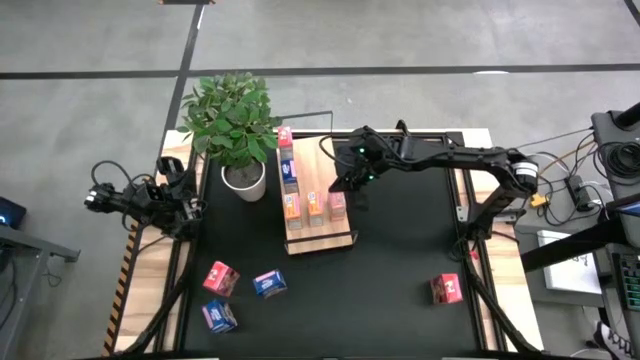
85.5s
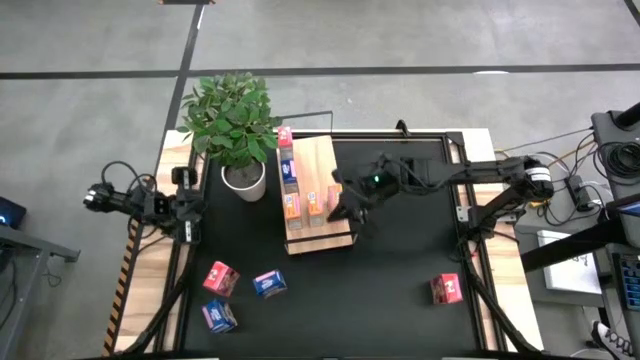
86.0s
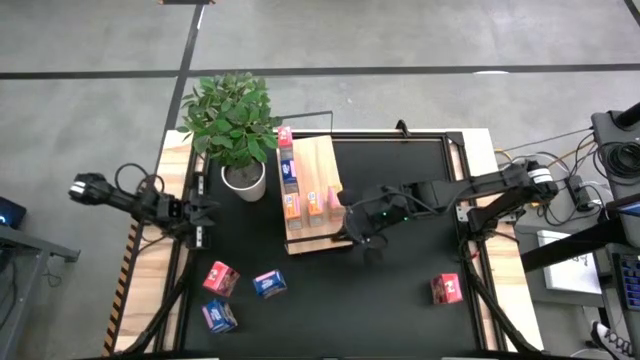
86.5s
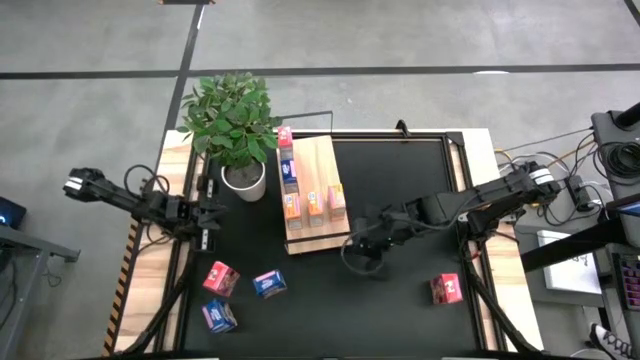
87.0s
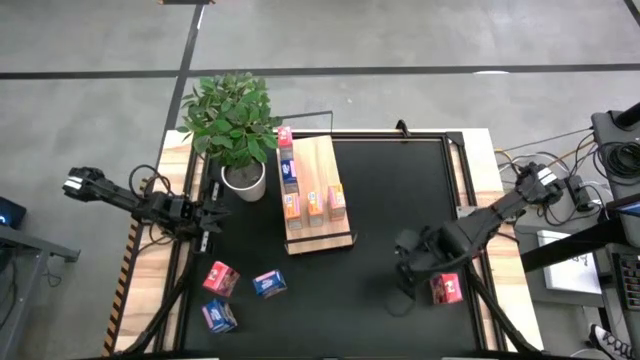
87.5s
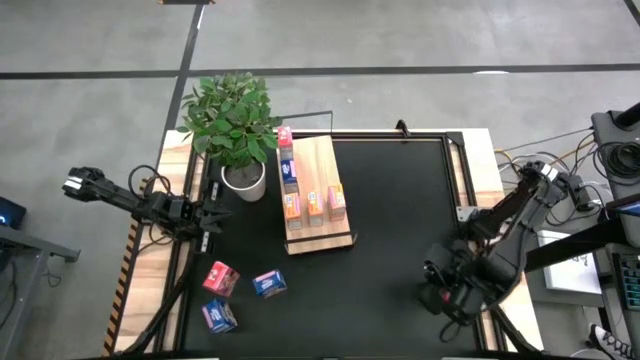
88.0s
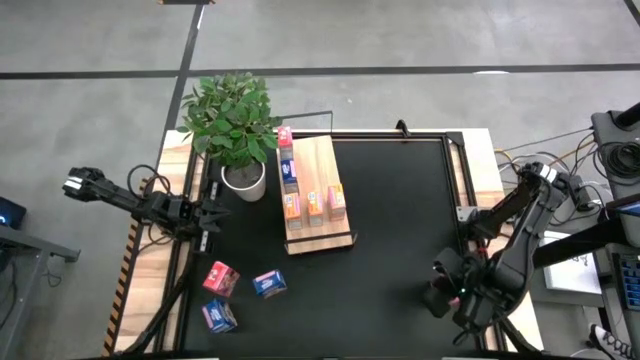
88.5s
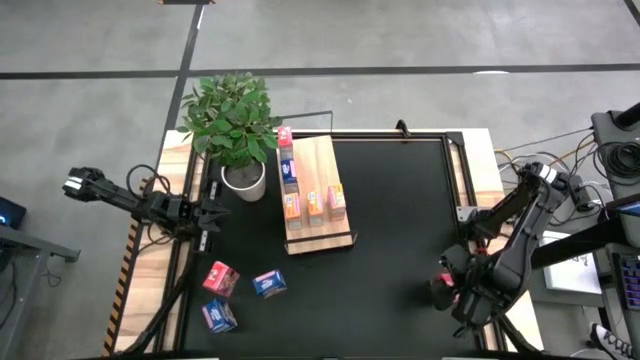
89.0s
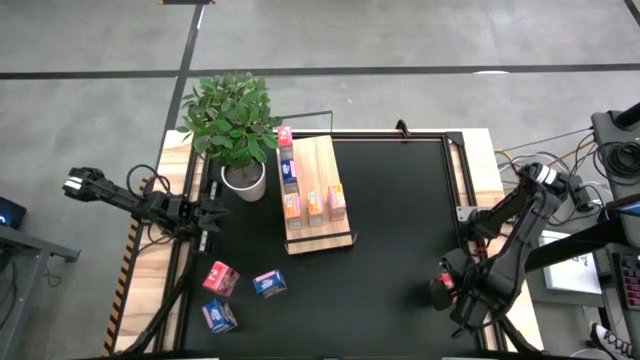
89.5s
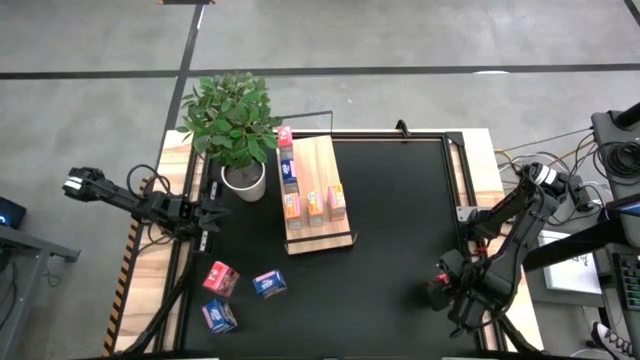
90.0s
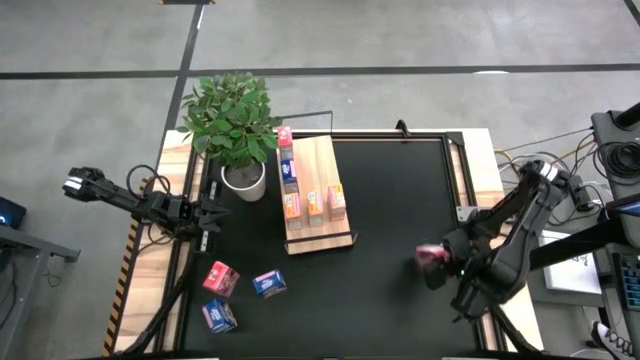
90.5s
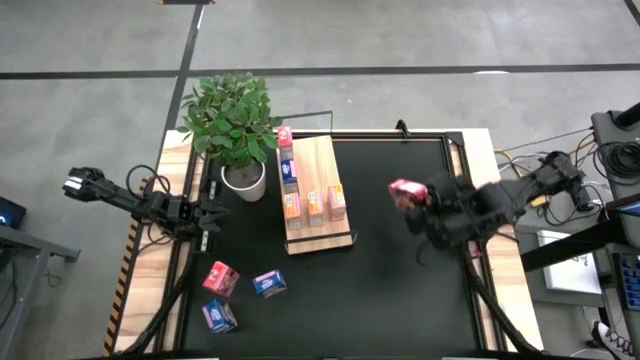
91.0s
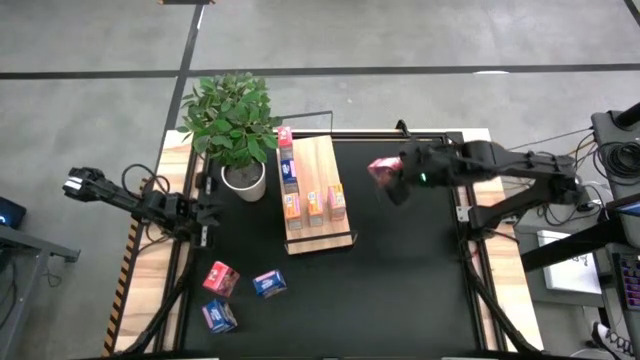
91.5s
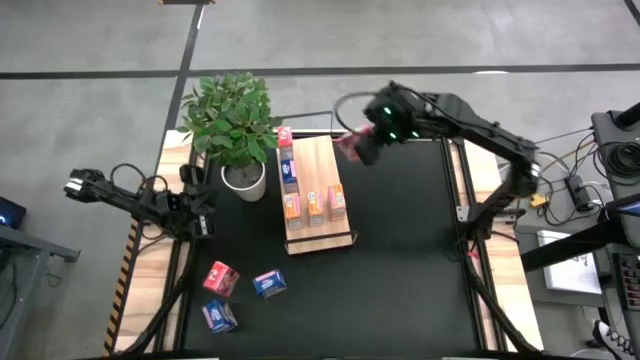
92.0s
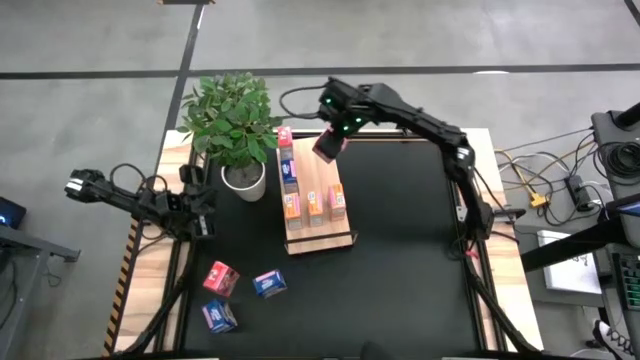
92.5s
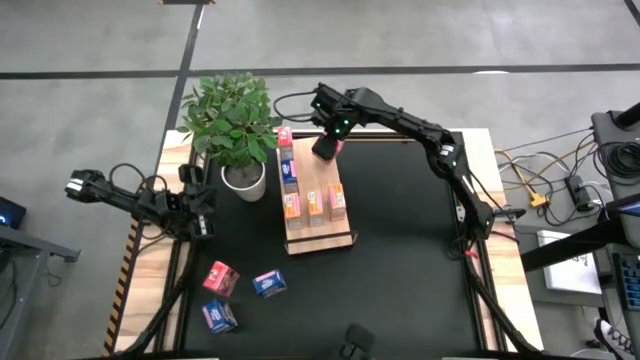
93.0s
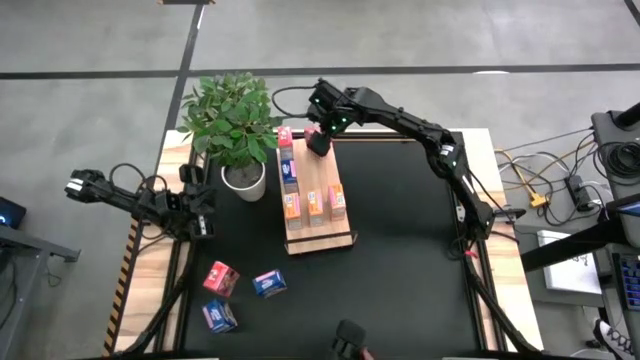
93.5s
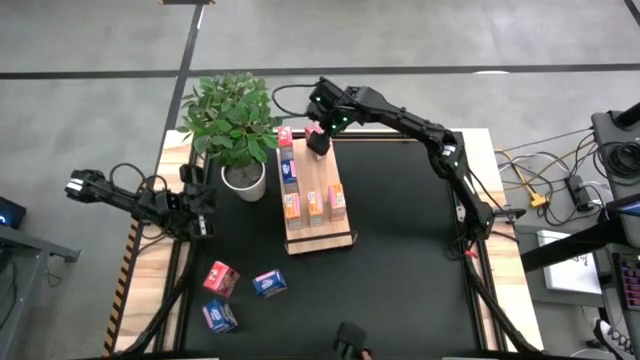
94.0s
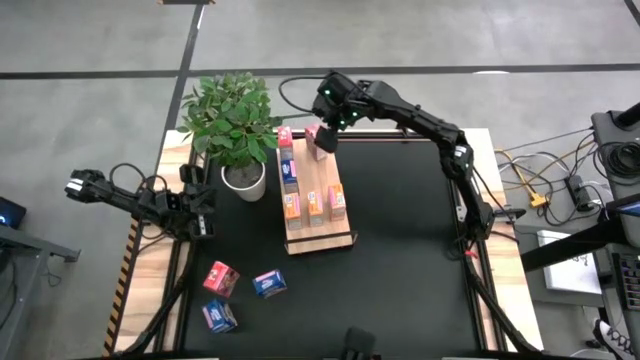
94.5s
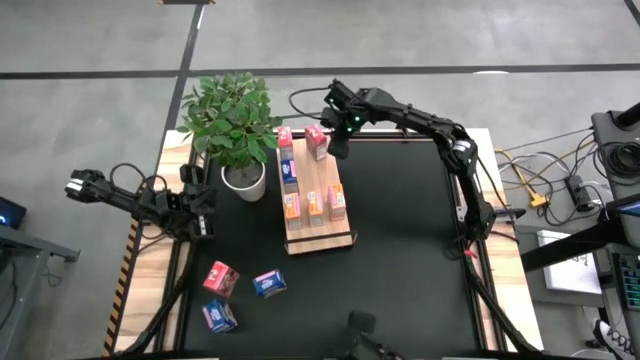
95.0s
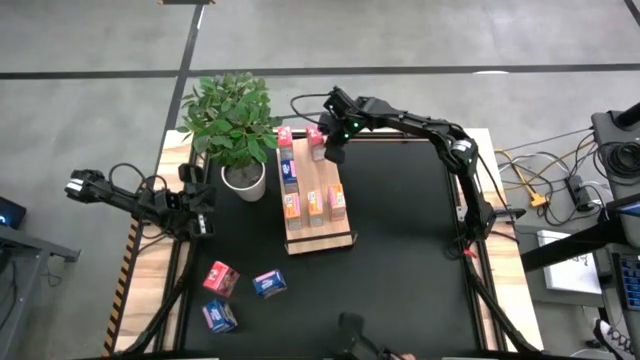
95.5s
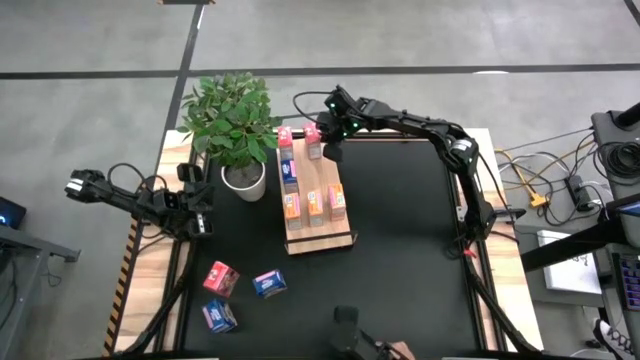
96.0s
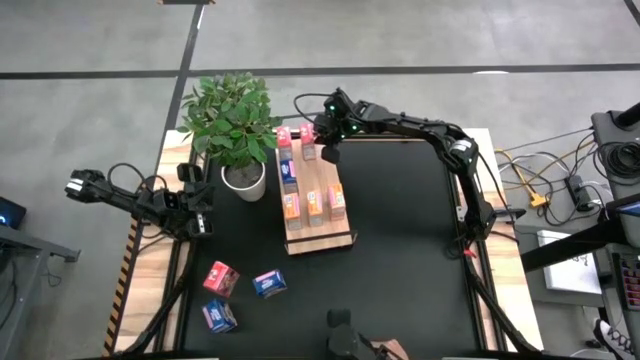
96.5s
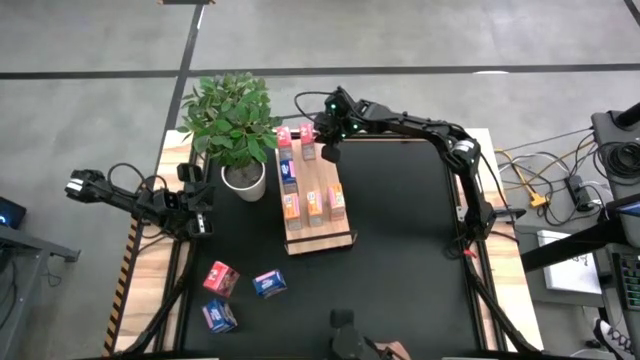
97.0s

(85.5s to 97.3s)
Task: Stack cereal on shelf
Put the right red cereal box on the shelf aligned with the other red cereal box

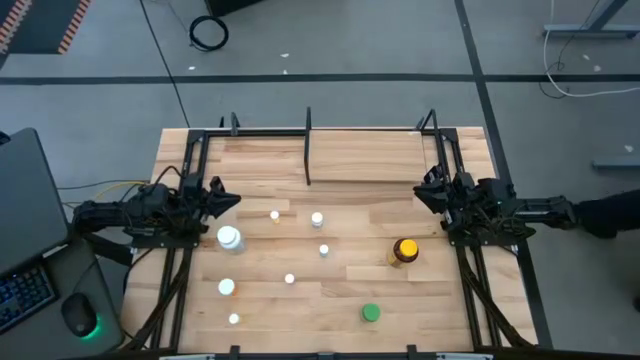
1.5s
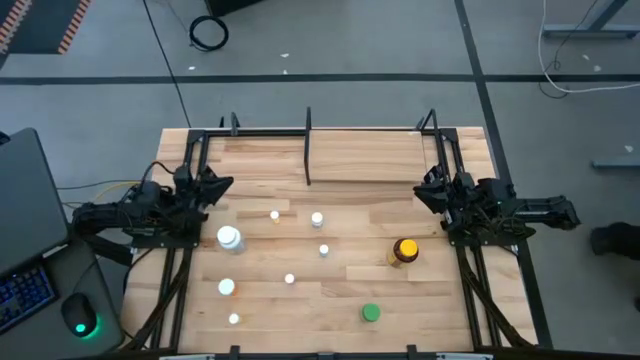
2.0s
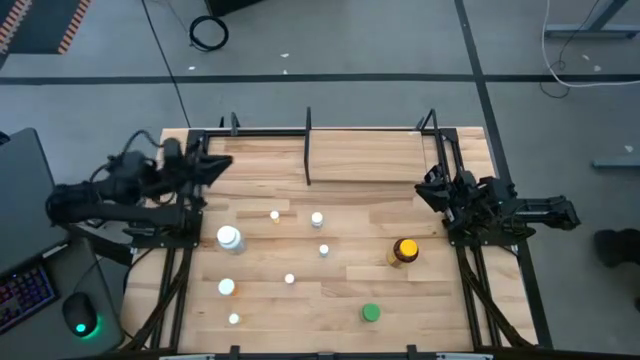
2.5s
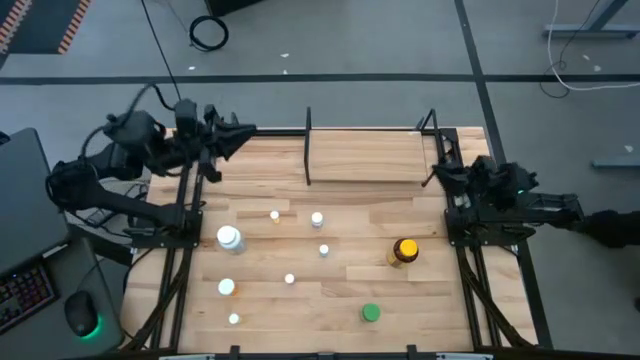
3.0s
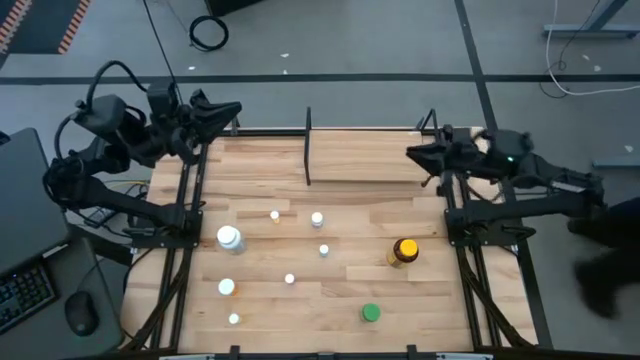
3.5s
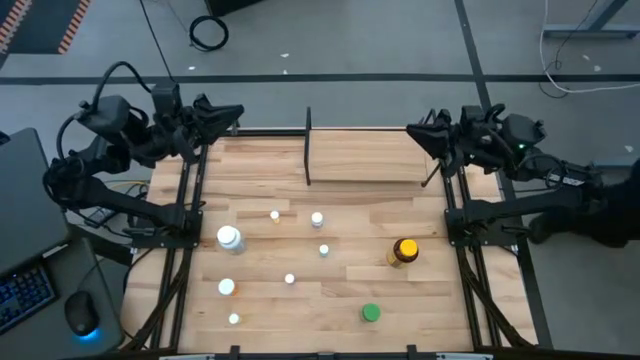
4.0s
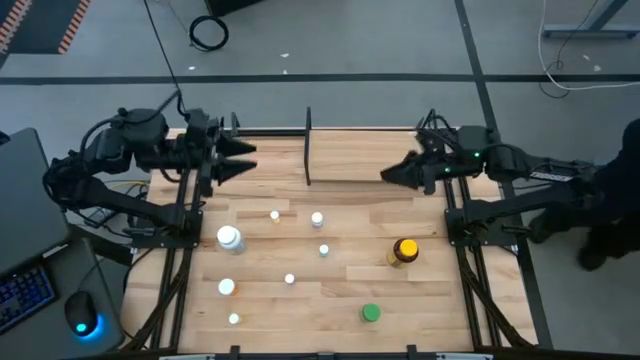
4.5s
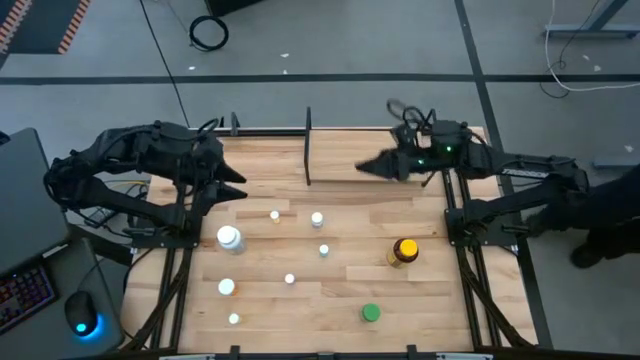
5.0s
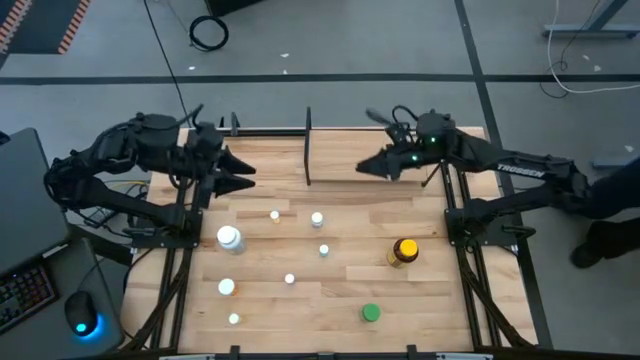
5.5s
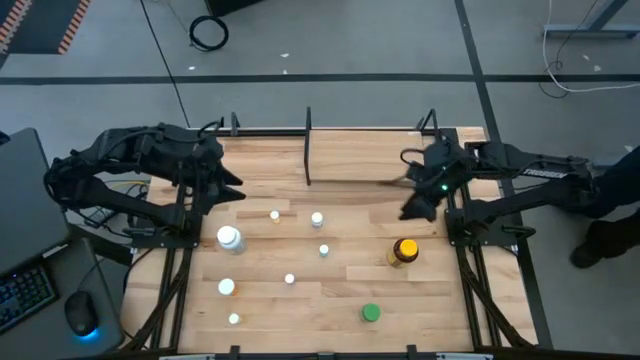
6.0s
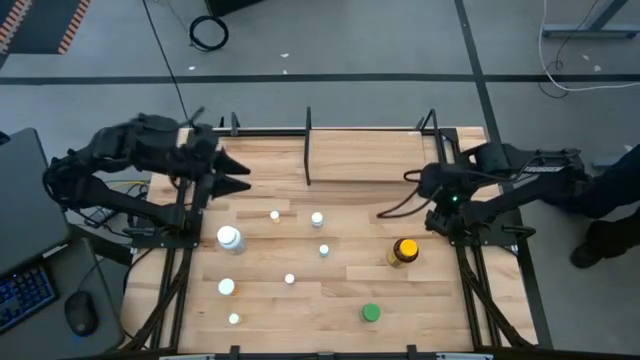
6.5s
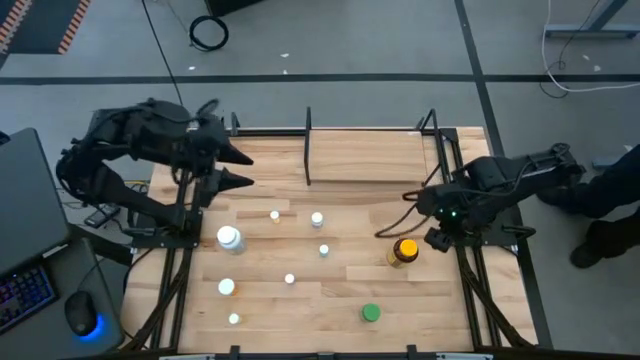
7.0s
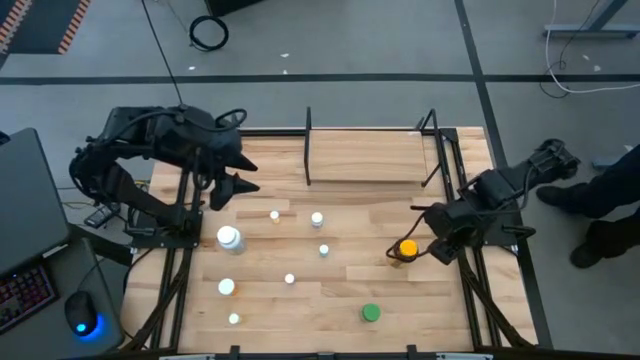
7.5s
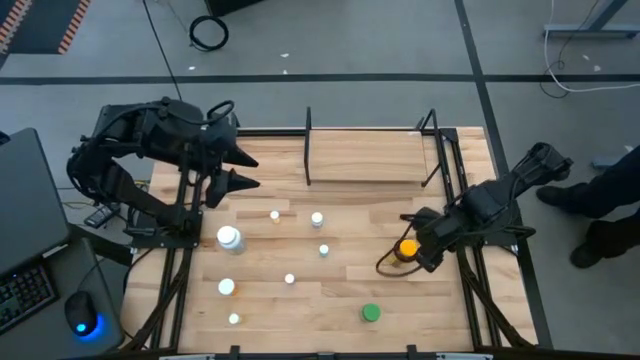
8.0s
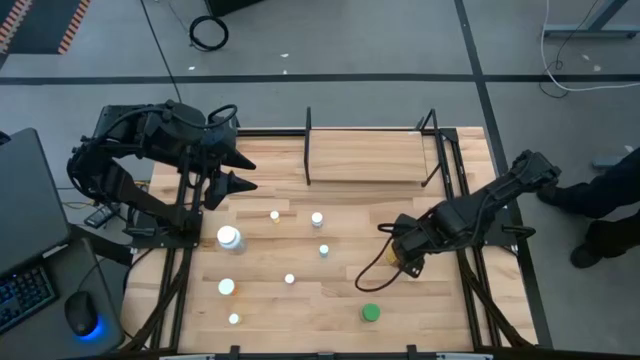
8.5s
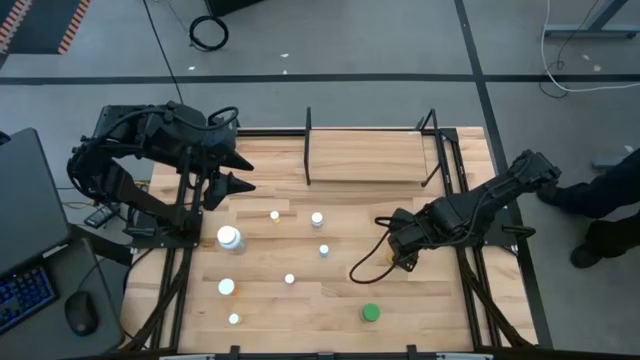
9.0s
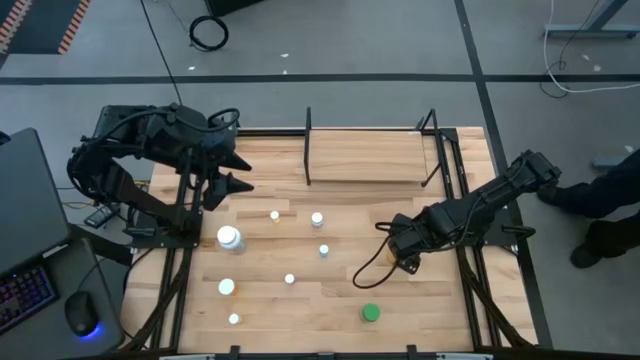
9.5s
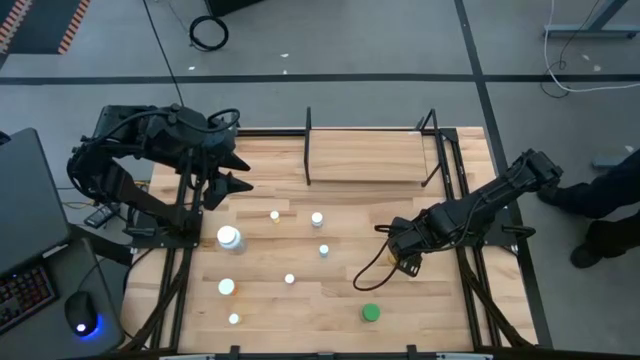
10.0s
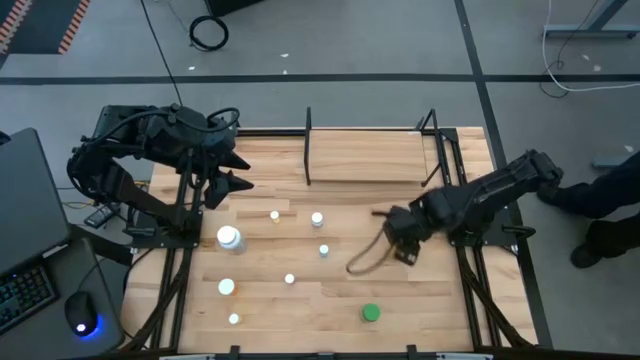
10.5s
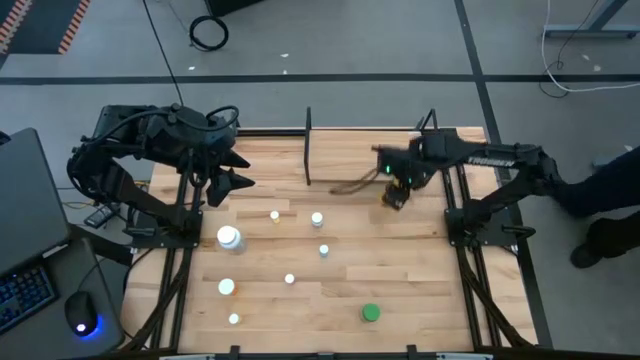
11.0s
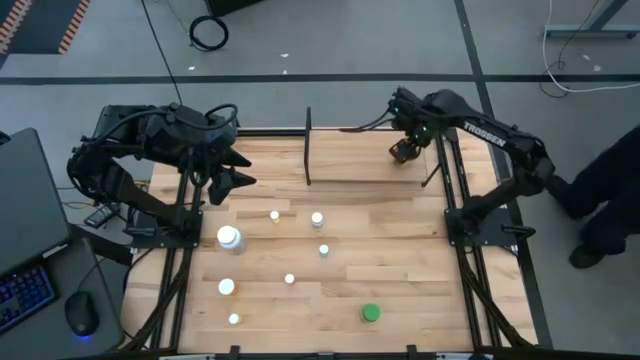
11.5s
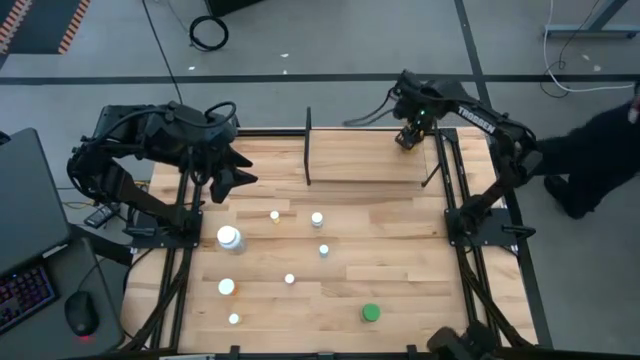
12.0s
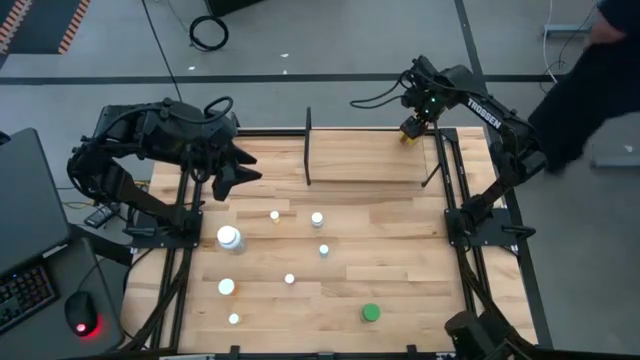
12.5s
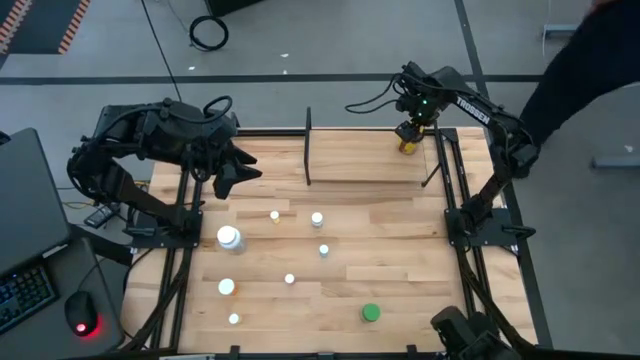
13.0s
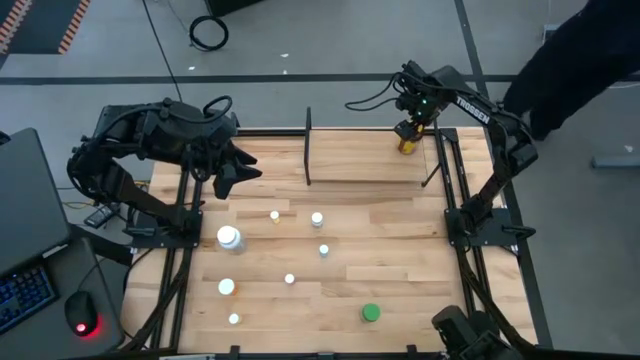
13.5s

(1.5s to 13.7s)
Task: Pick and place medicine bottles onto shelf by color
Put the large yellow pill bottle on the shelf
